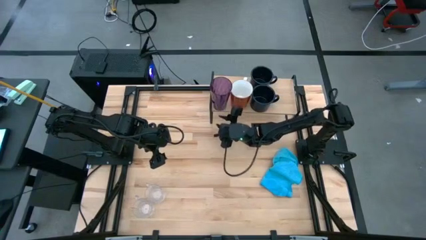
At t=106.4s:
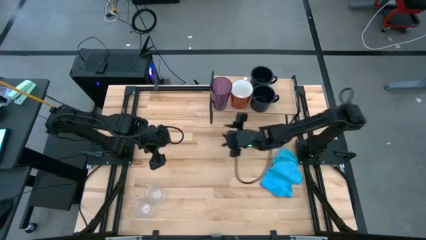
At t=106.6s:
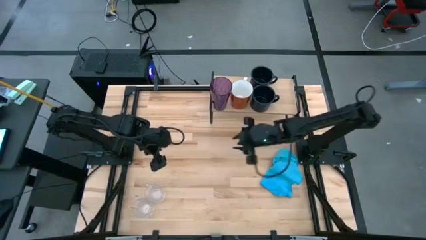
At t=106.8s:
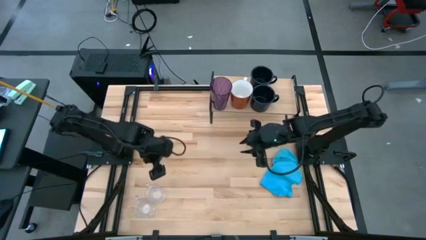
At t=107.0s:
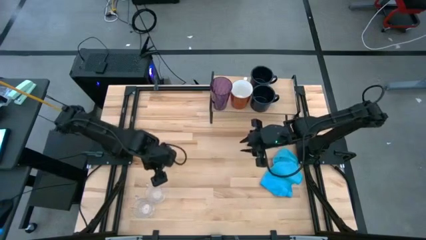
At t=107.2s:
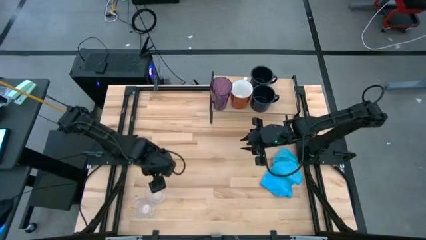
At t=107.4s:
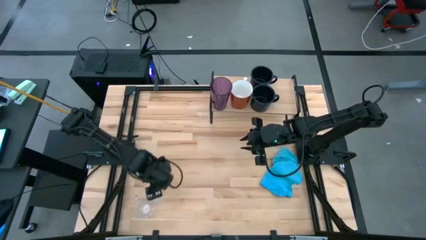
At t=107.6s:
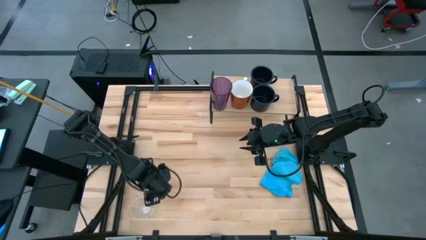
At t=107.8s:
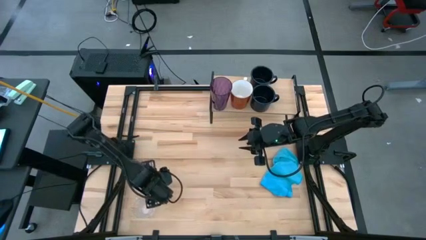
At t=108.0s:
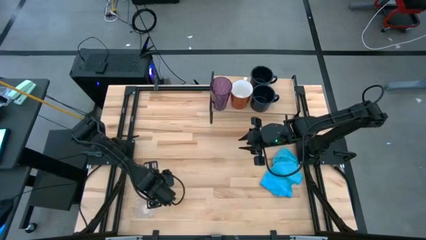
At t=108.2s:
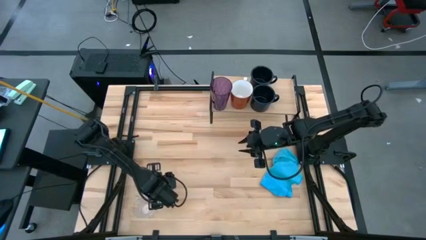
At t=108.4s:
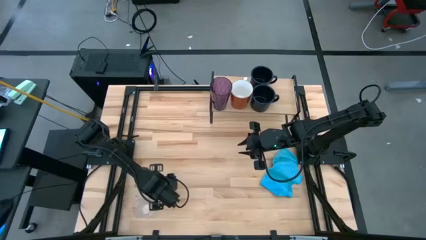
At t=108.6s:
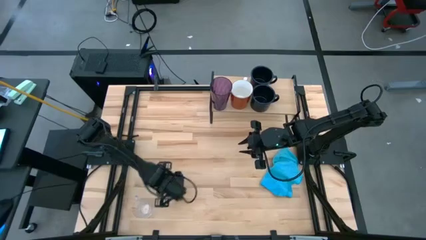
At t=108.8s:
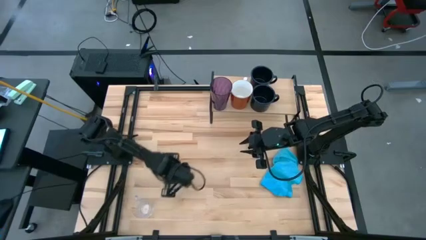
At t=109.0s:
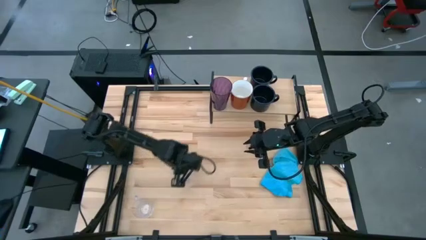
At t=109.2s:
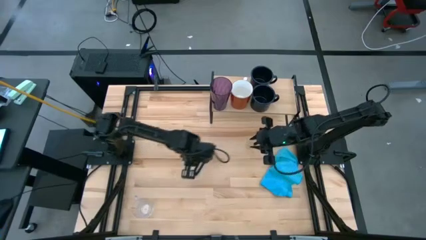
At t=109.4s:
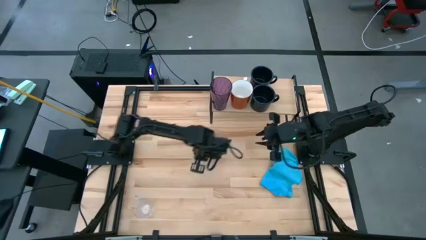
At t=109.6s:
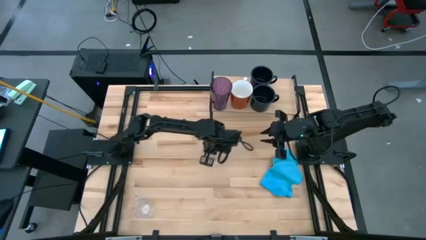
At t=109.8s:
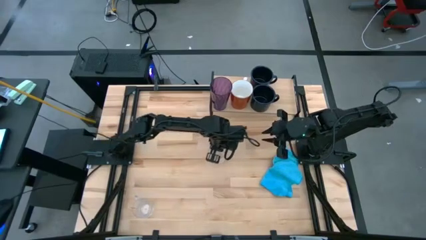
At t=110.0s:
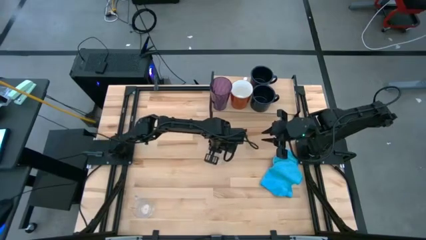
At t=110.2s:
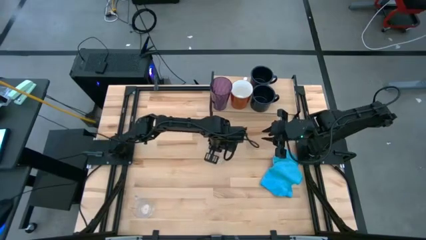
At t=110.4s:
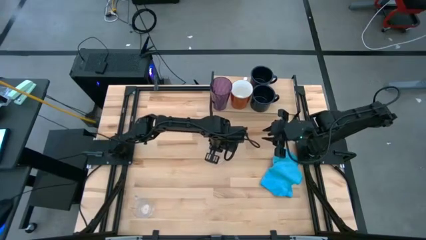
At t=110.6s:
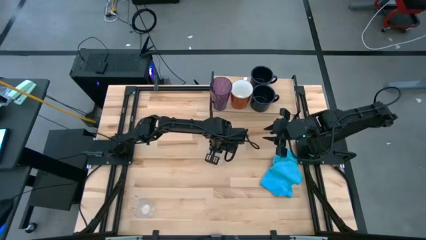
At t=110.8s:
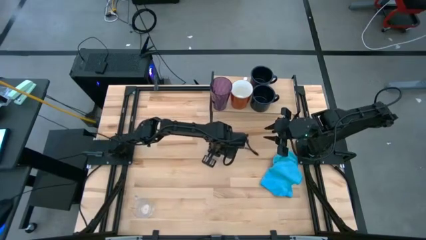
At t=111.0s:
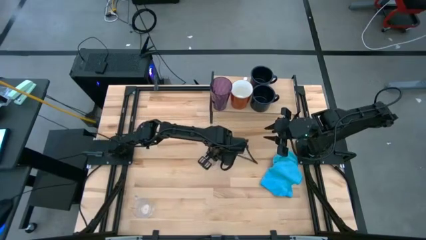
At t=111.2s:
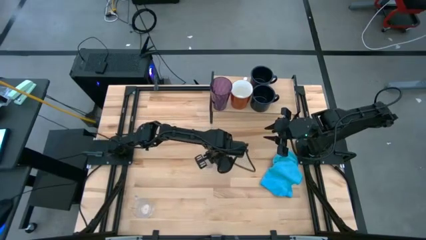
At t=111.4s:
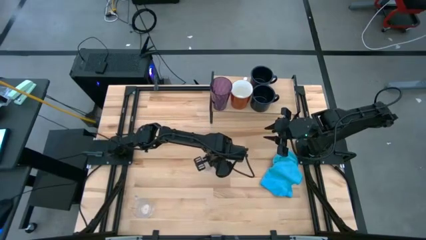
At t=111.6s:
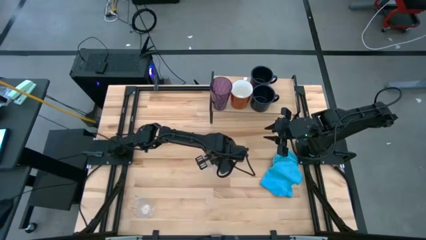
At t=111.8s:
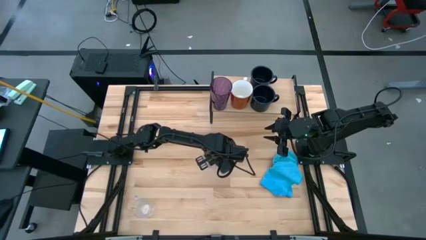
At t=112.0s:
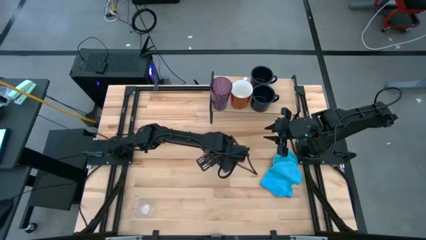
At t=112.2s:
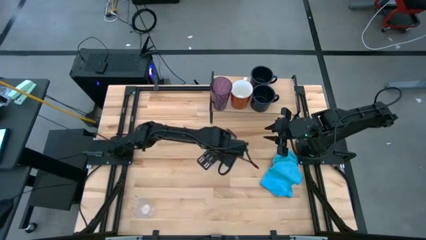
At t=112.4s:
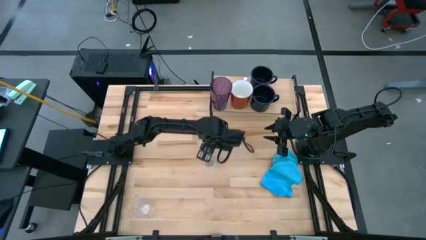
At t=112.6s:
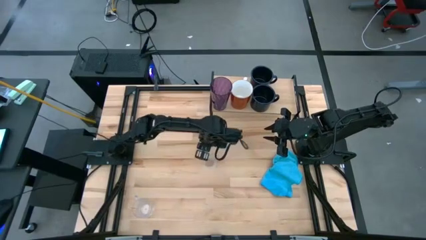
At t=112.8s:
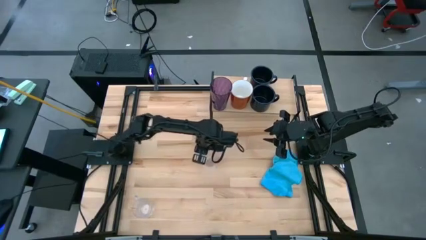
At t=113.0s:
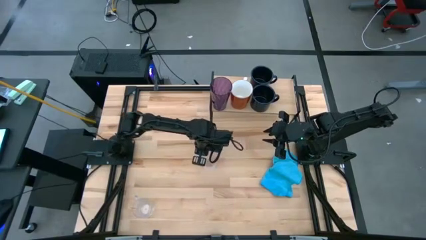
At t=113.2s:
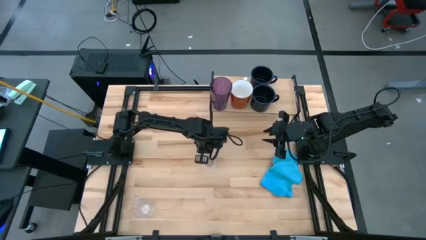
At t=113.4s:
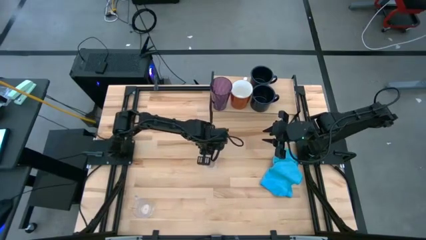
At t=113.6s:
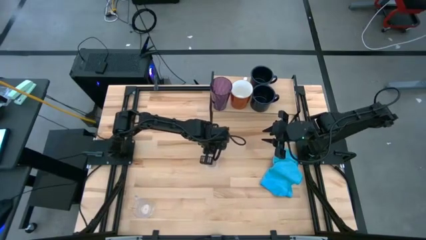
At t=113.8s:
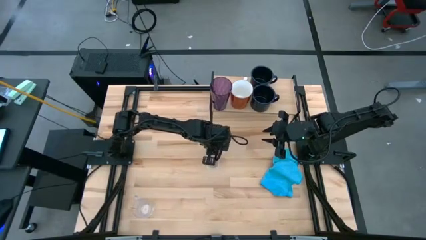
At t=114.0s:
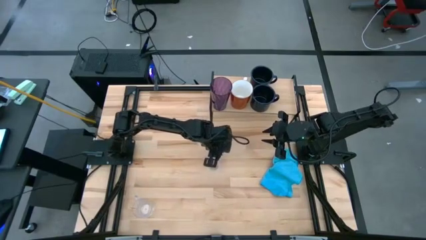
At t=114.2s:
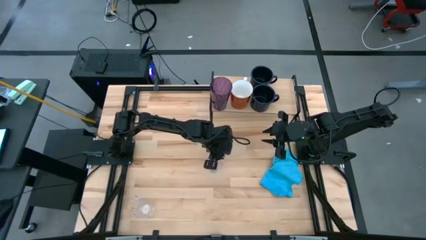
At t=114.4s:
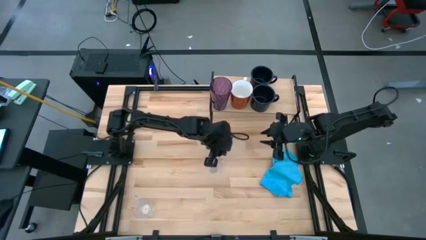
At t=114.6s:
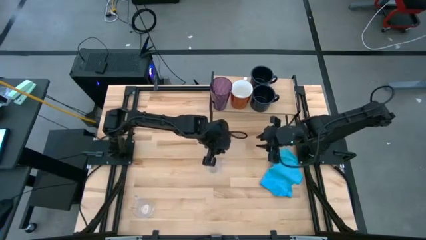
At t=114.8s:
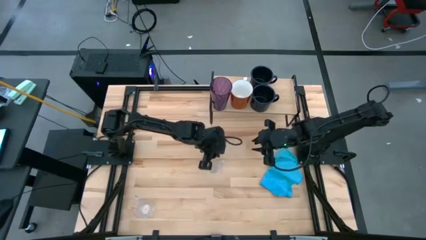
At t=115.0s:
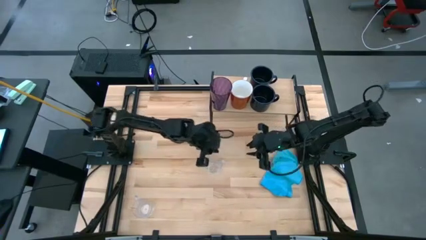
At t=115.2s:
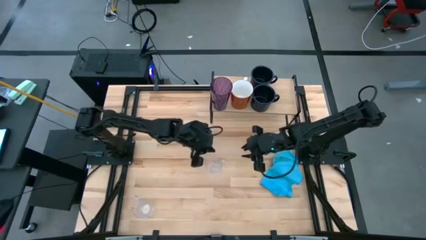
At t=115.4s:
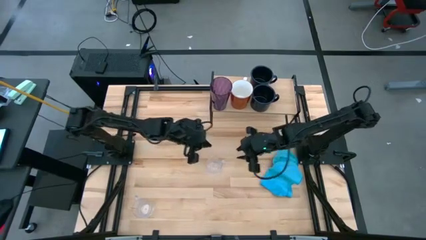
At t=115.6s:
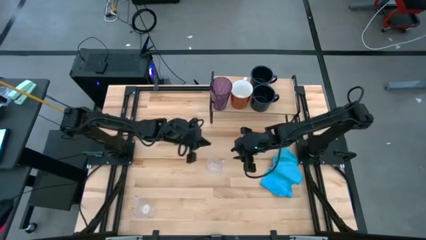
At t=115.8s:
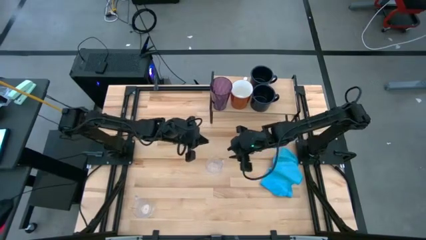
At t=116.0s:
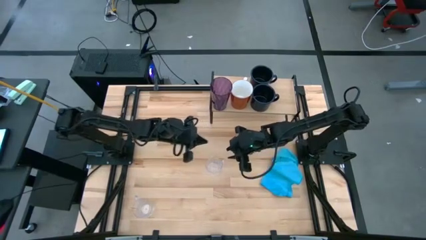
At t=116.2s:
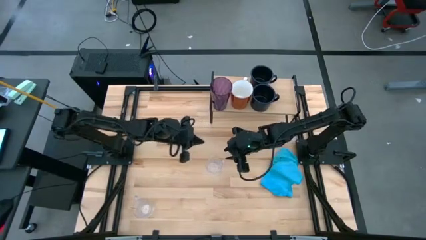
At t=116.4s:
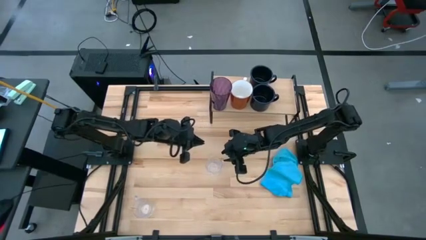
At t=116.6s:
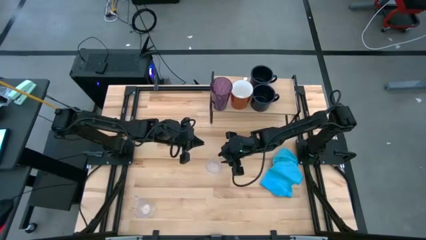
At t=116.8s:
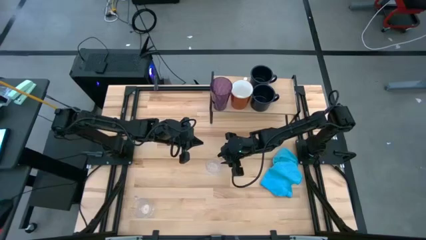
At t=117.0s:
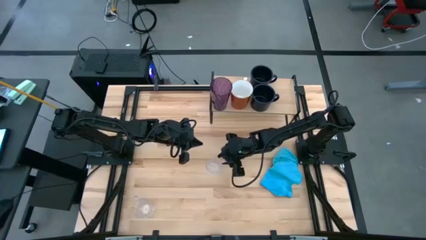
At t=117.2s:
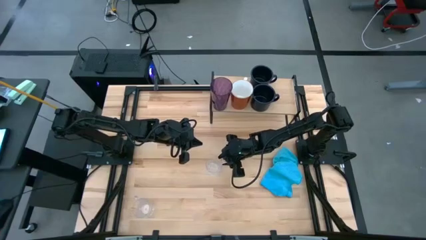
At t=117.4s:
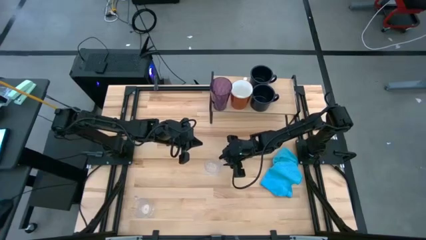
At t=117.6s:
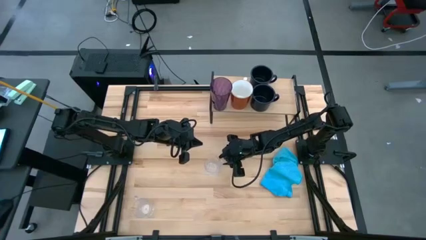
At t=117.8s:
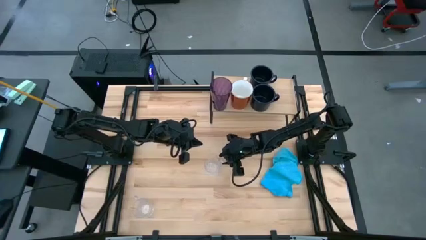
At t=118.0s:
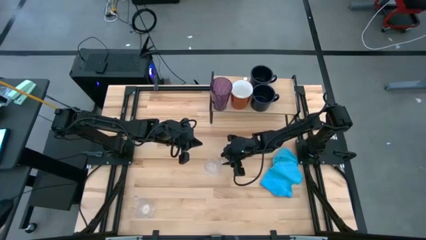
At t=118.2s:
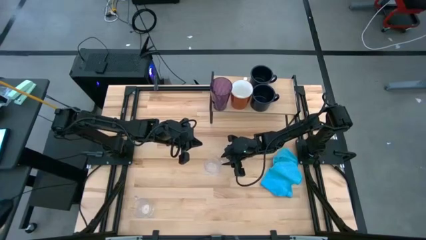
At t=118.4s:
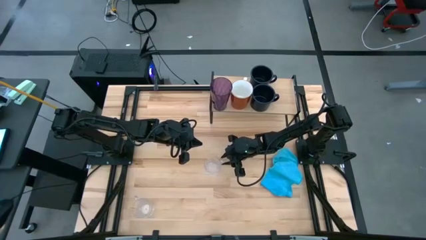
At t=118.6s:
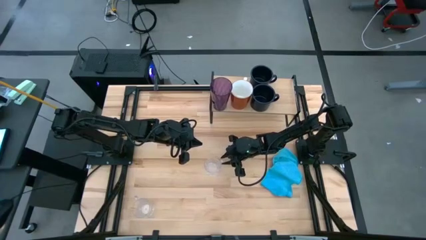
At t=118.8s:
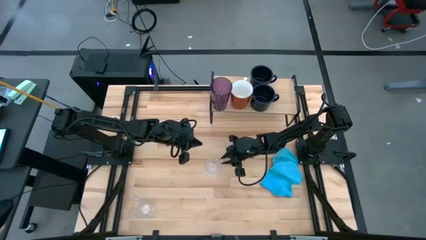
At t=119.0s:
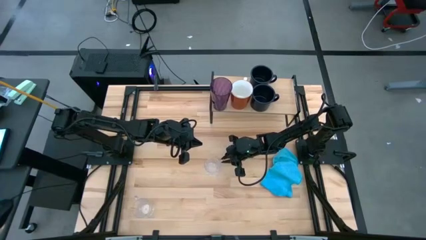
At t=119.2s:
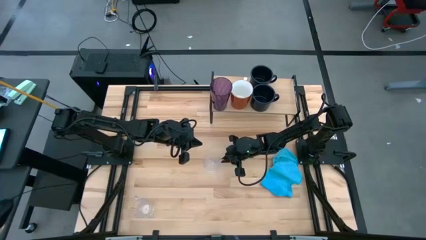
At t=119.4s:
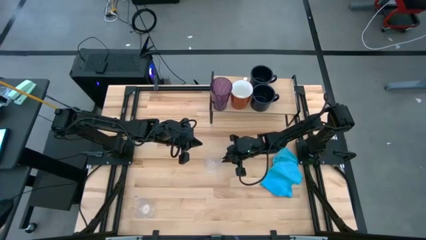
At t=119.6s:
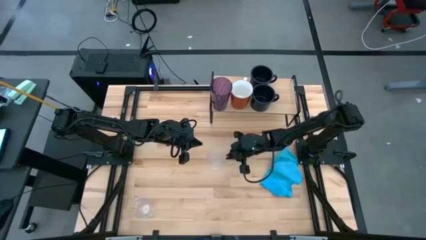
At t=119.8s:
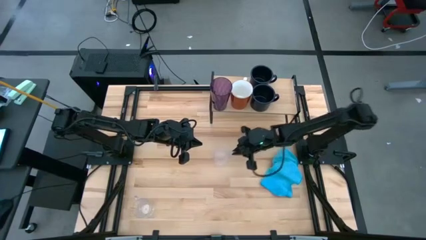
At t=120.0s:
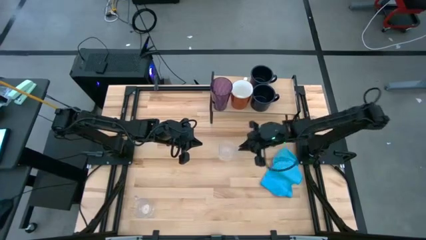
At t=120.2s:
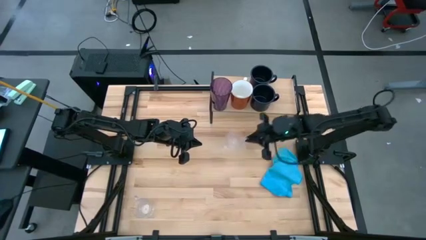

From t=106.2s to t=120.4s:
Task: Stack small to large cups/mugs on shelf
Put the top transparent mug on the shelf

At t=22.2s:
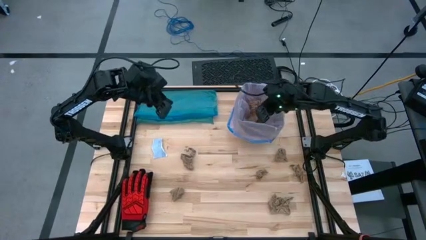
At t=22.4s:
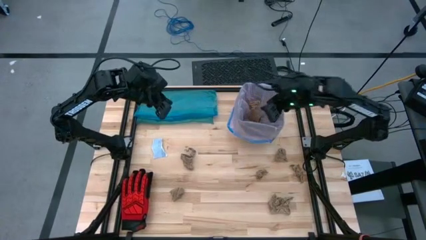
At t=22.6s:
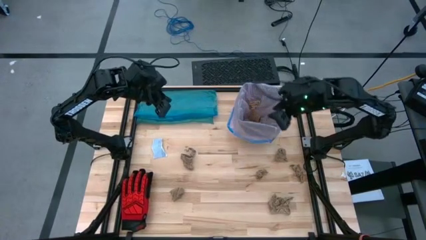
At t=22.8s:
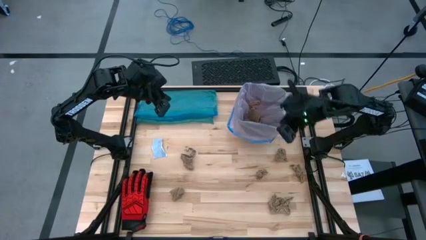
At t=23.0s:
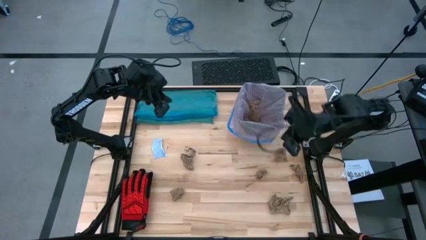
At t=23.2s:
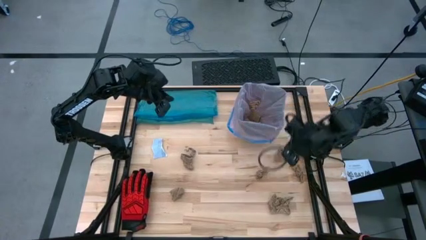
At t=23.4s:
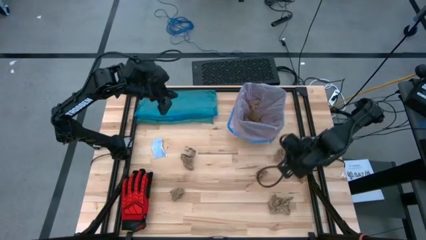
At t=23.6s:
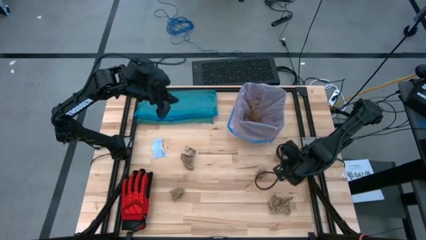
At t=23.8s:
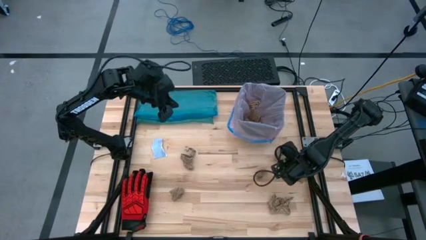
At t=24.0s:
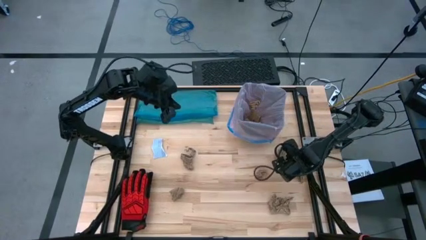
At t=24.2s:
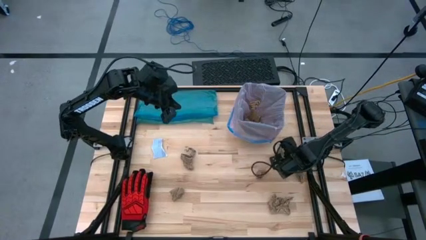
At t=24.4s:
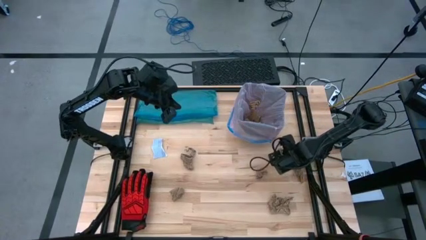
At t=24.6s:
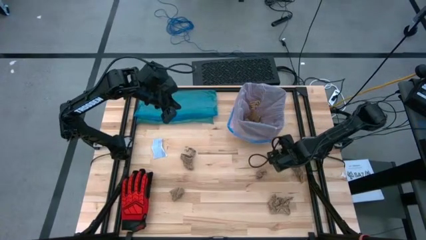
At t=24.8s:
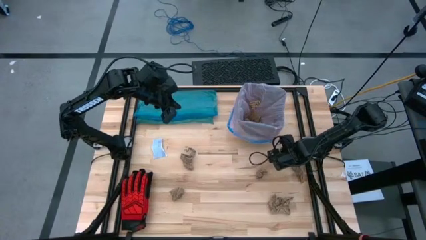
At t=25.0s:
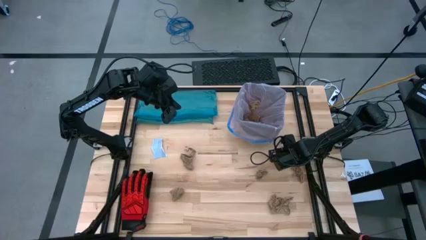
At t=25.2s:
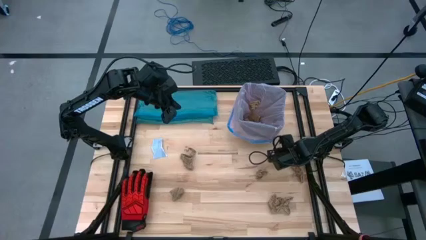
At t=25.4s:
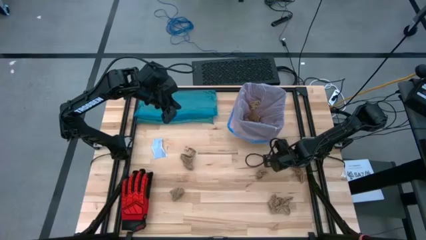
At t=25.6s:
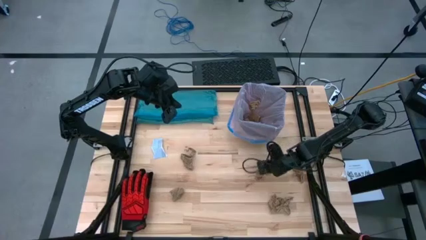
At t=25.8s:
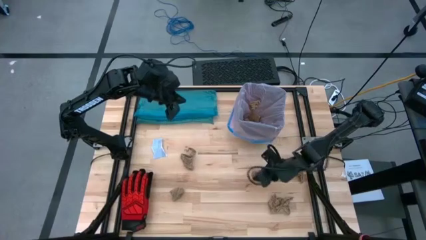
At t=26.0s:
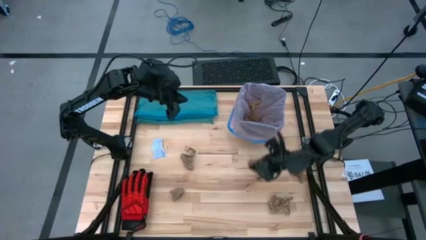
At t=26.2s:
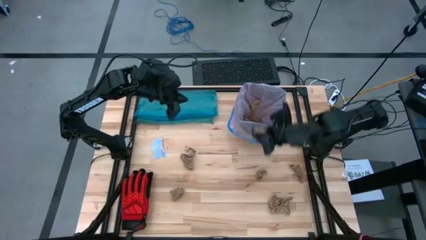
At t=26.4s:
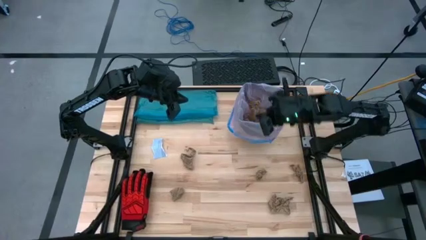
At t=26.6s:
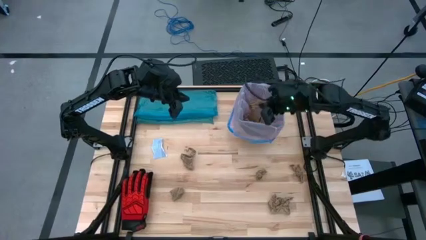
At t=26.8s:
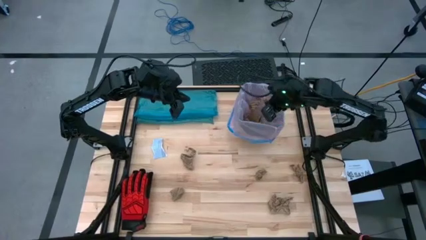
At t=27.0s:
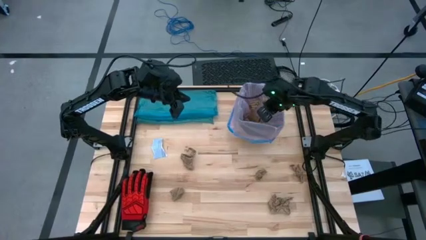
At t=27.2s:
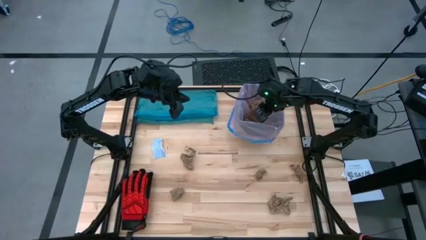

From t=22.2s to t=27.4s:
Task: place trash/remove bag and relplace
Put the brown napkin into the trash bin
